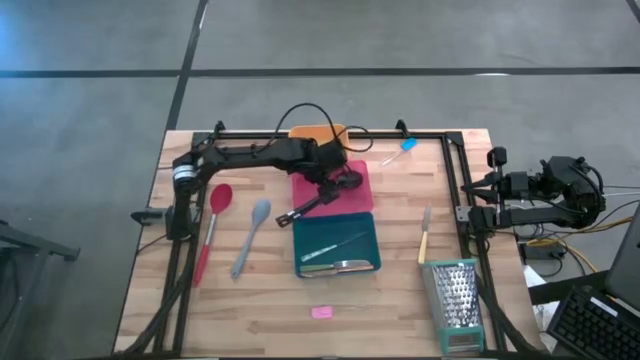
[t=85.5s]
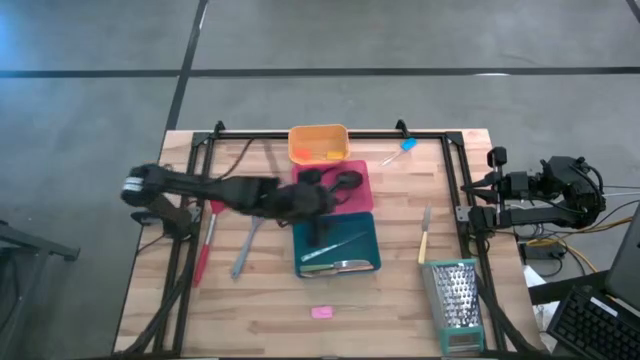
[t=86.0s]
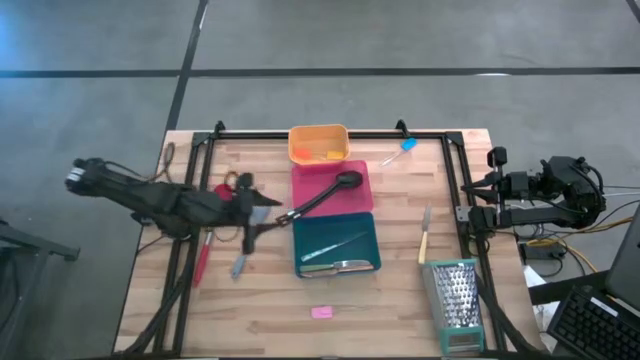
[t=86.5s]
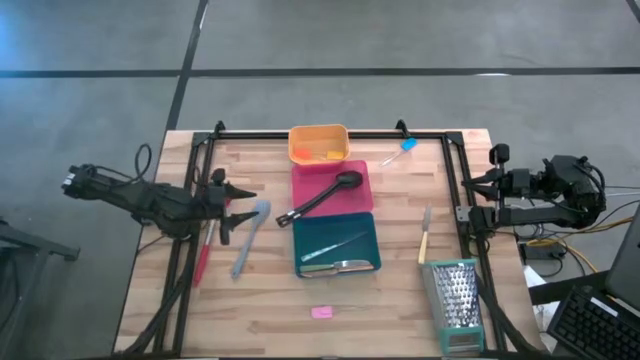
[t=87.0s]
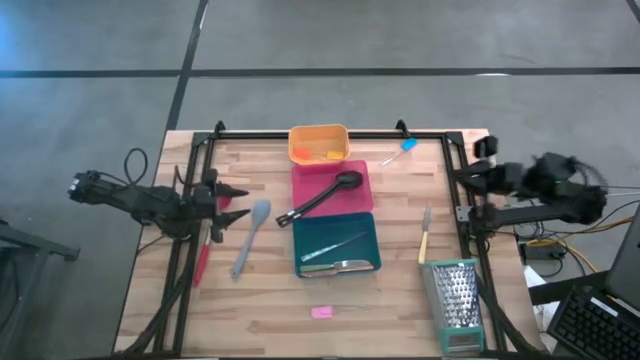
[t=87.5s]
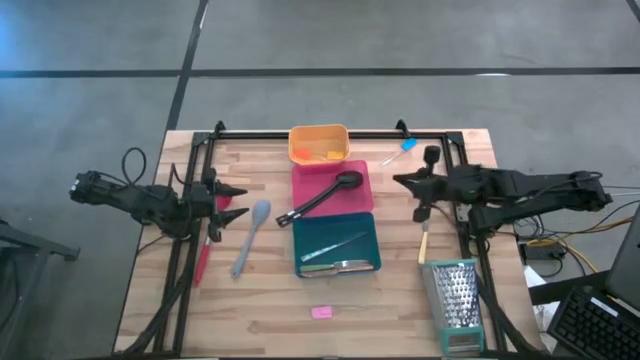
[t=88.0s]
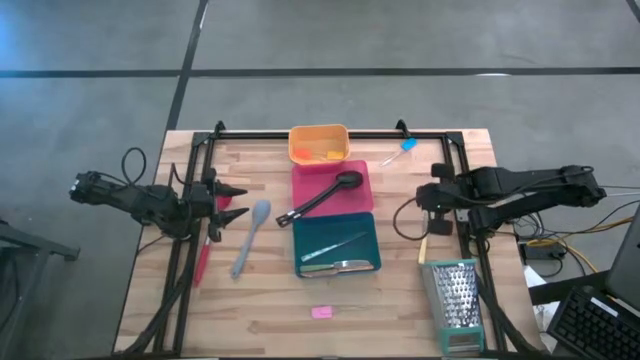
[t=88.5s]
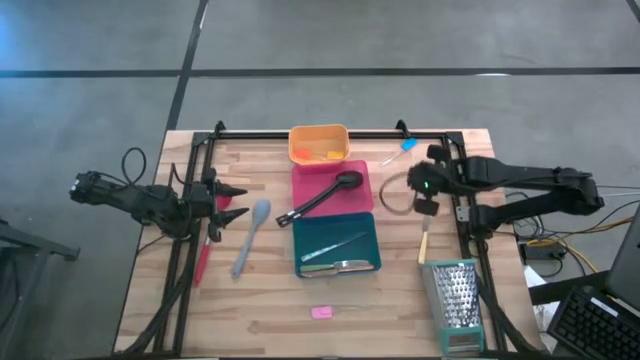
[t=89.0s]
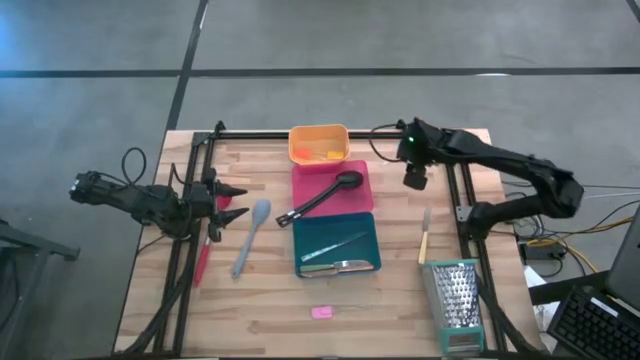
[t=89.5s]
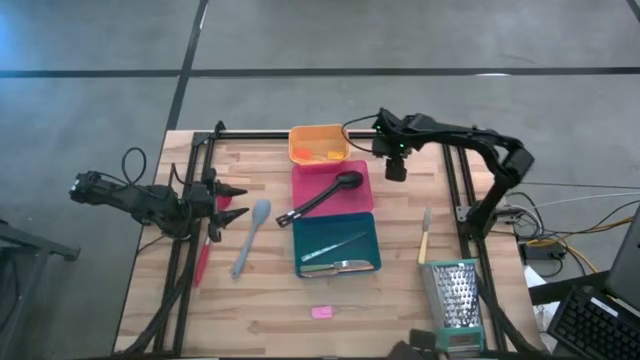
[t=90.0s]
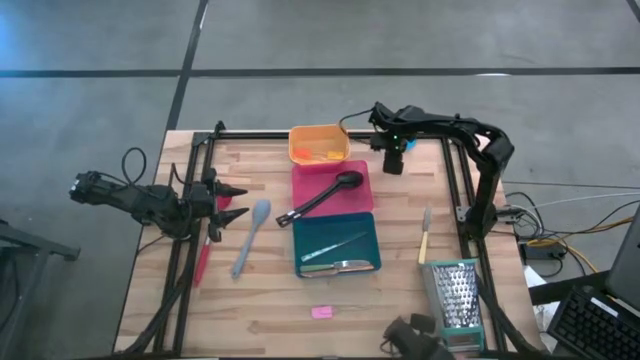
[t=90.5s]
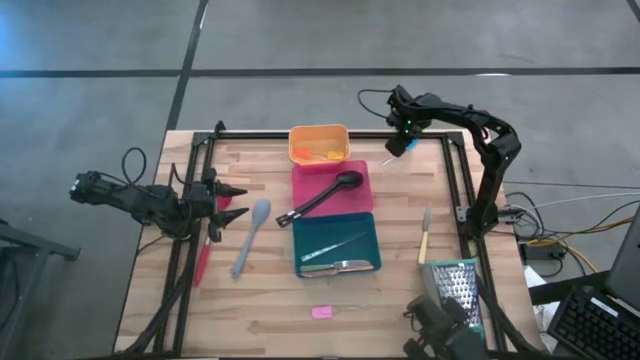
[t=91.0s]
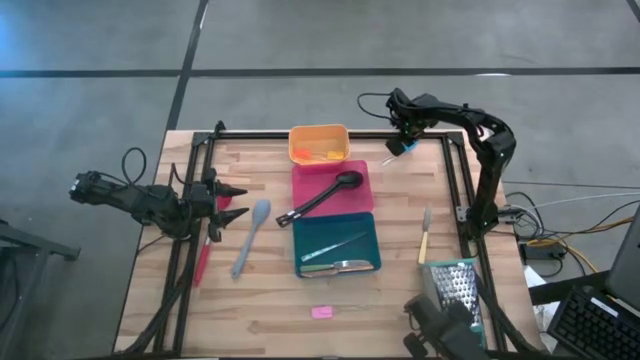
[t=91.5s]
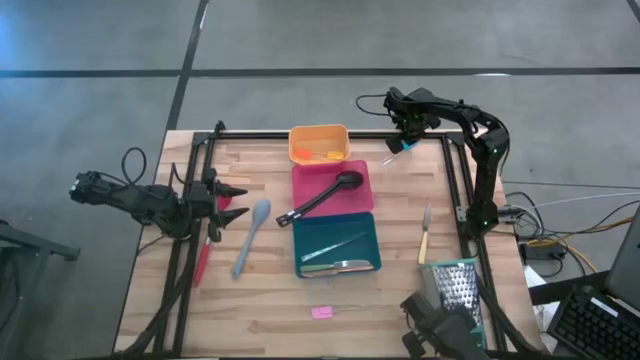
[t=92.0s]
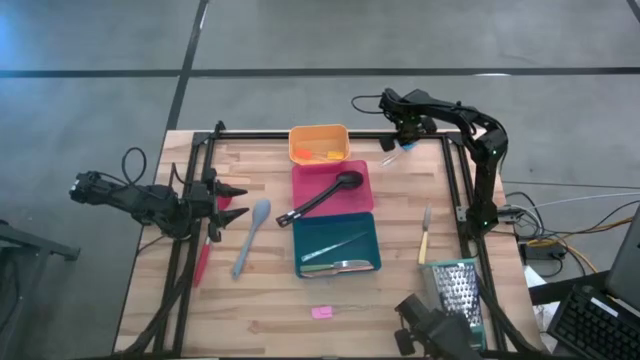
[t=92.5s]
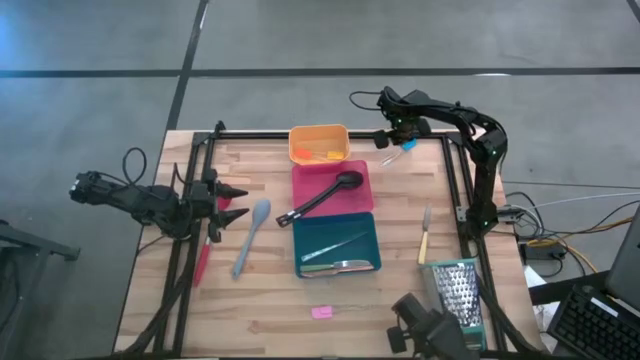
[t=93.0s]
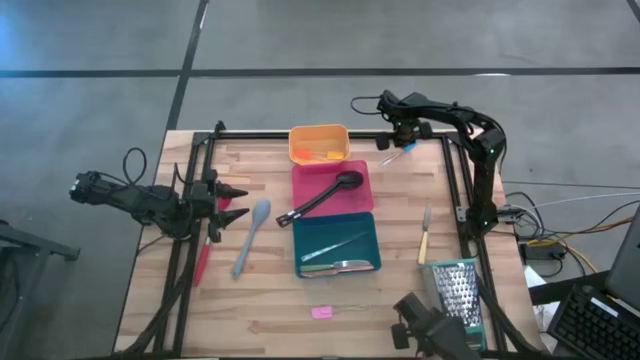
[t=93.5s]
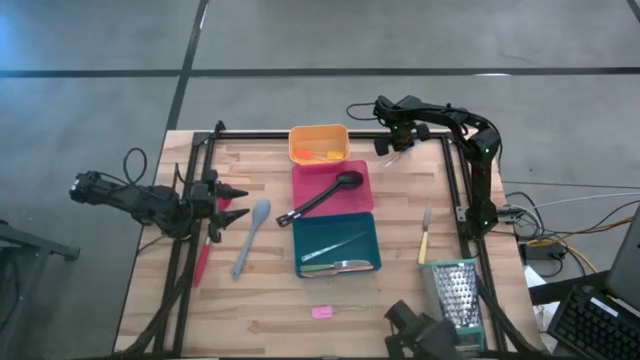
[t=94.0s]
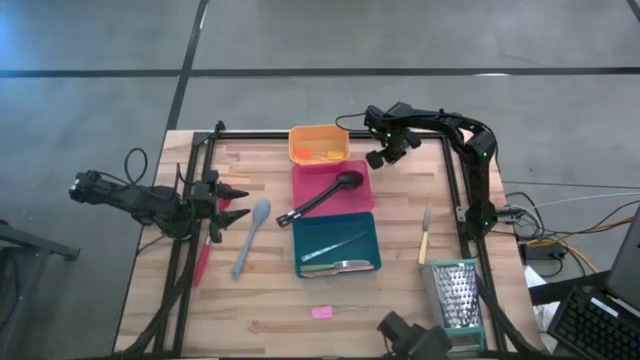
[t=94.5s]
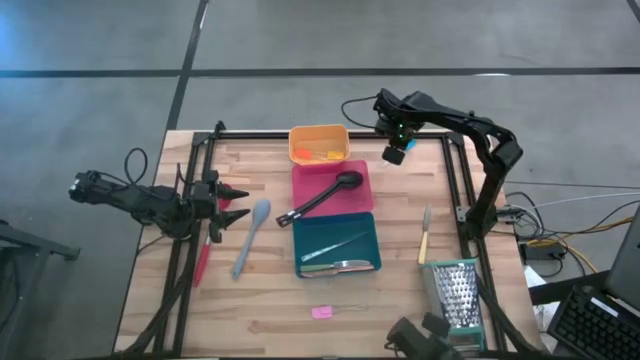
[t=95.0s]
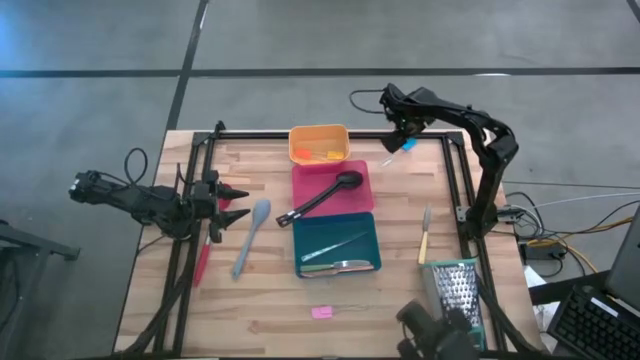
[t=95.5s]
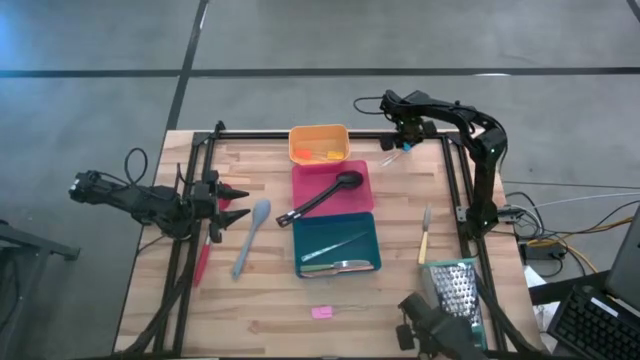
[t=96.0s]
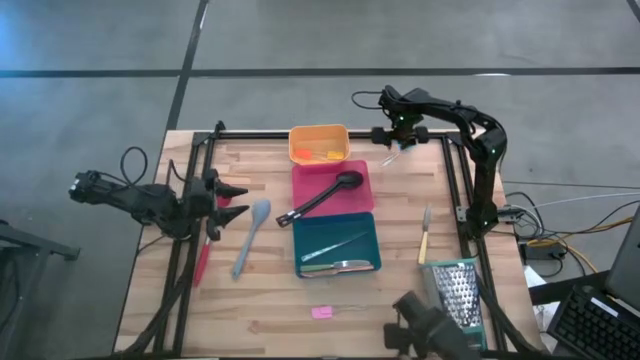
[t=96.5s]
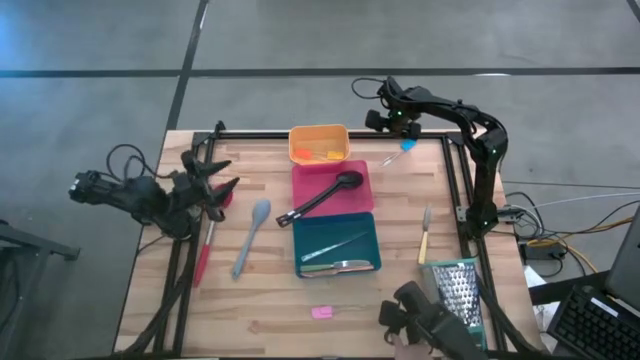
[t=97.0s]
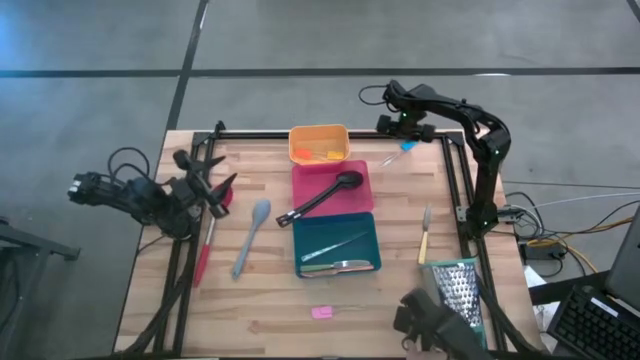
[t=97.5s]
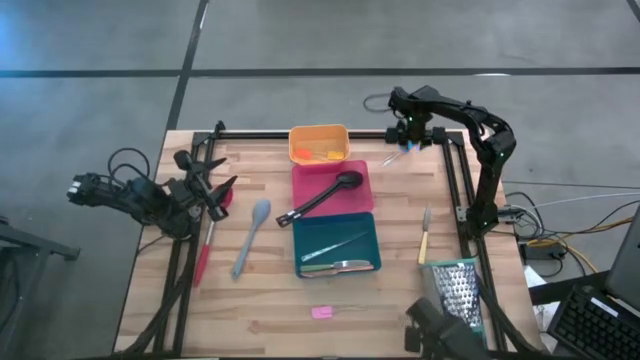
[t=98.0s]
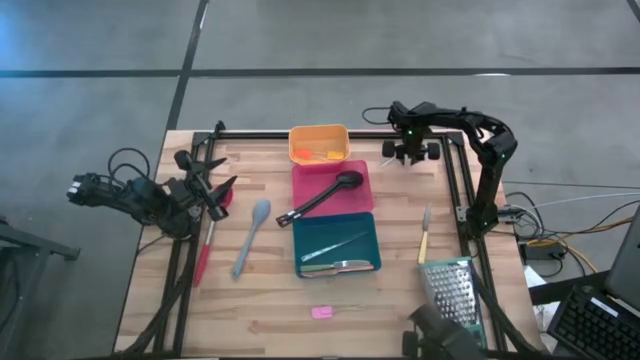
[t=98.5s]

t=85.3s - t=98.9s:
Task: Pick & Place Kitchen Items
Put the blue spatula into the yellow bin

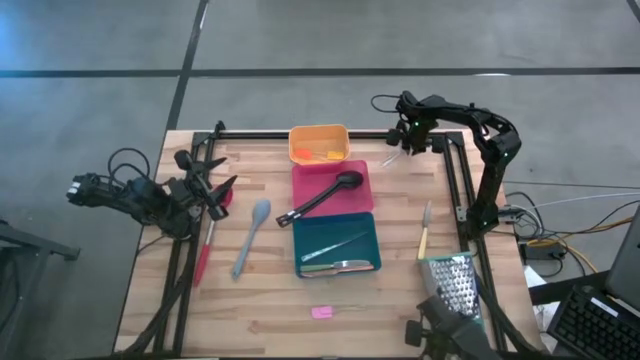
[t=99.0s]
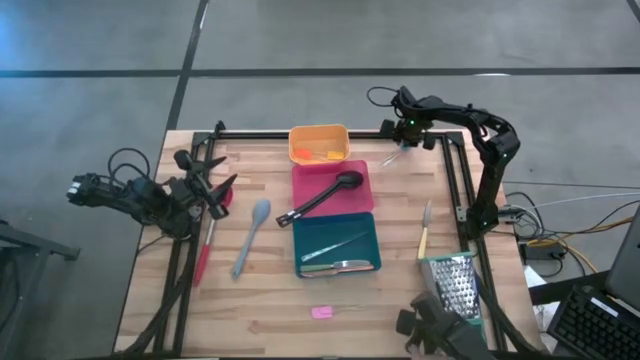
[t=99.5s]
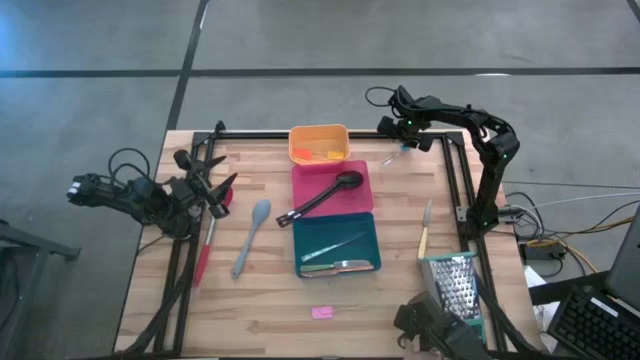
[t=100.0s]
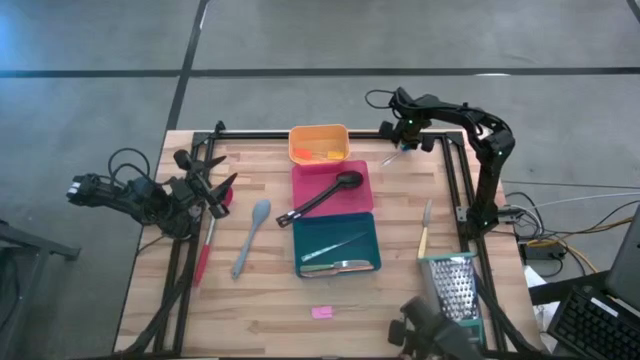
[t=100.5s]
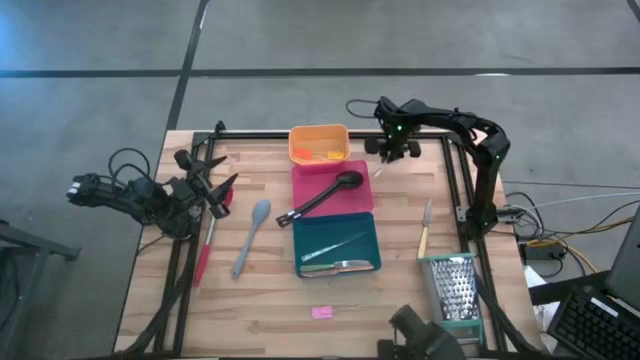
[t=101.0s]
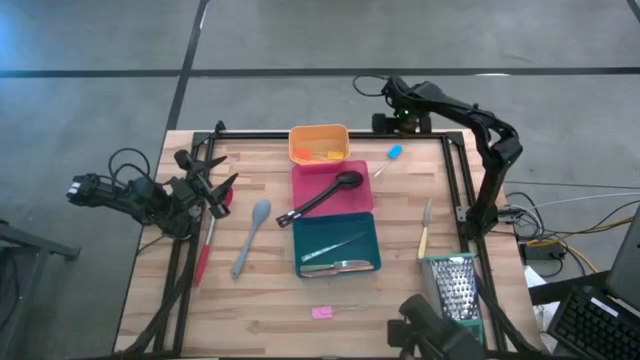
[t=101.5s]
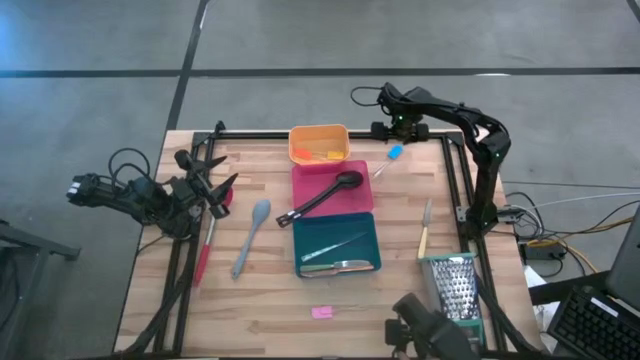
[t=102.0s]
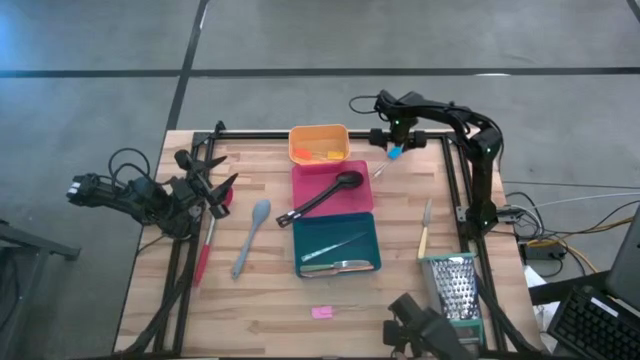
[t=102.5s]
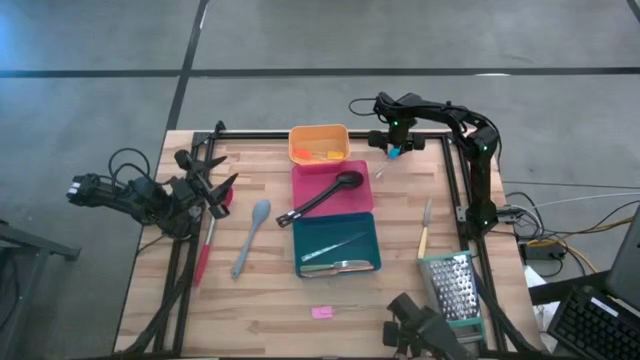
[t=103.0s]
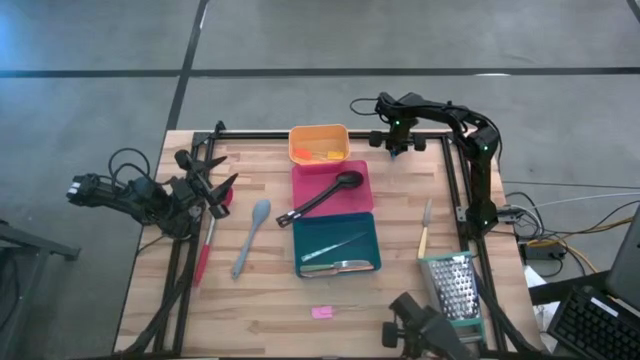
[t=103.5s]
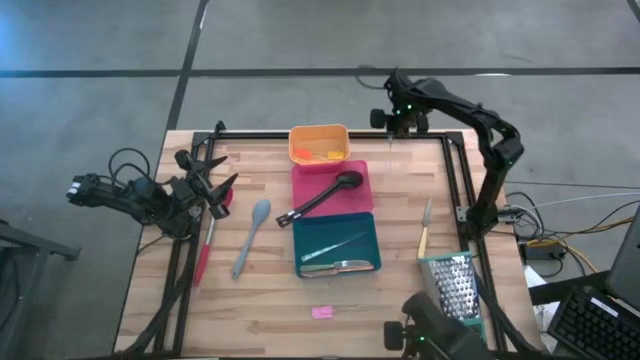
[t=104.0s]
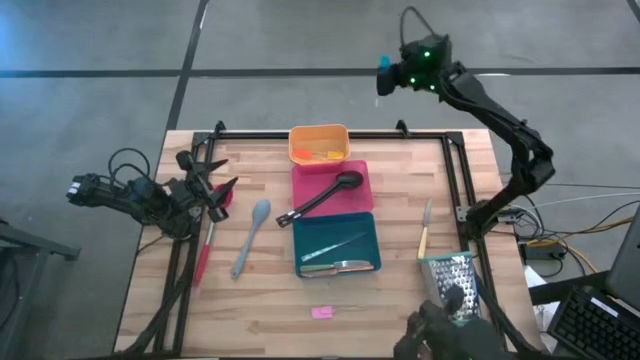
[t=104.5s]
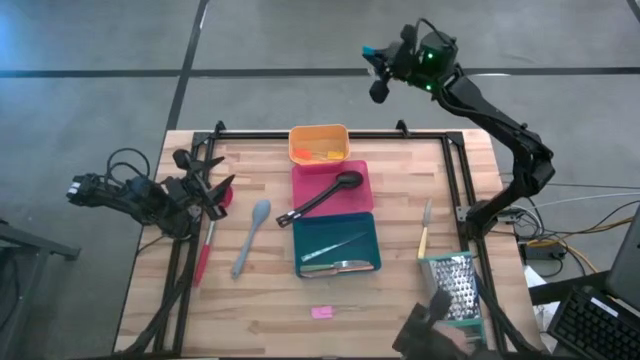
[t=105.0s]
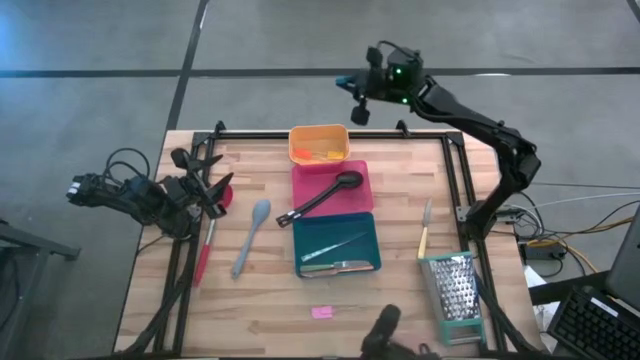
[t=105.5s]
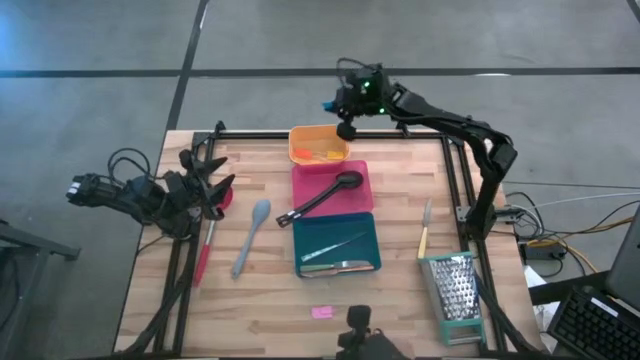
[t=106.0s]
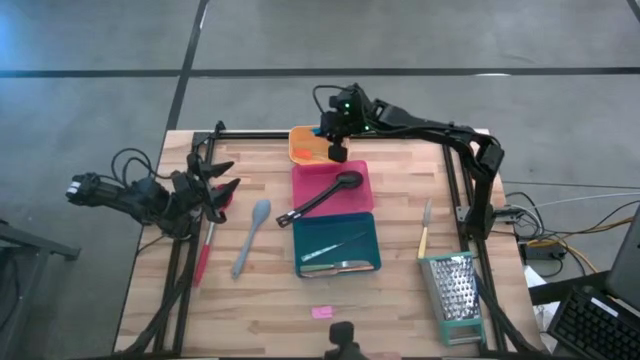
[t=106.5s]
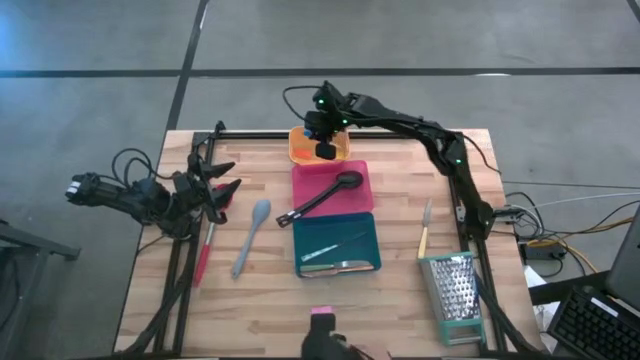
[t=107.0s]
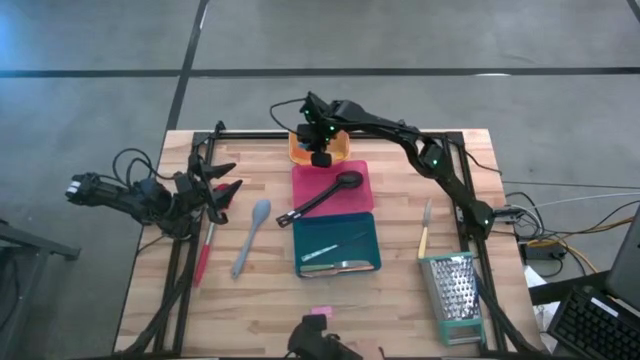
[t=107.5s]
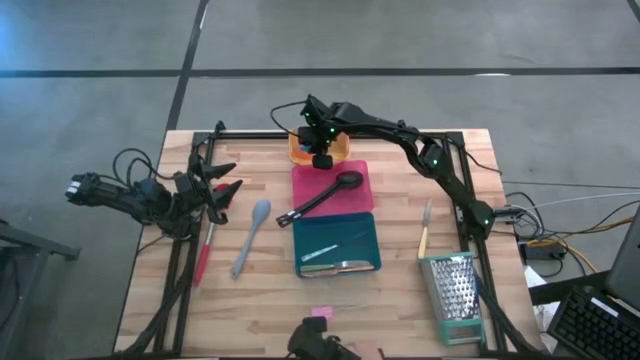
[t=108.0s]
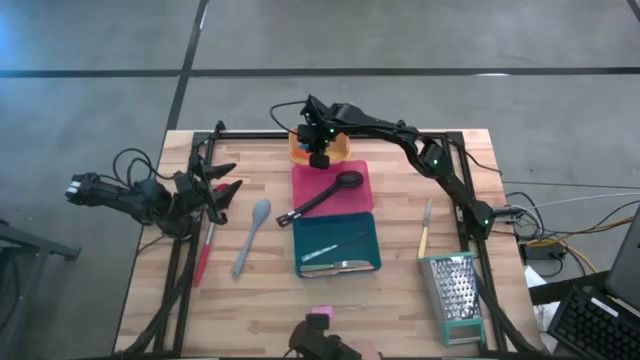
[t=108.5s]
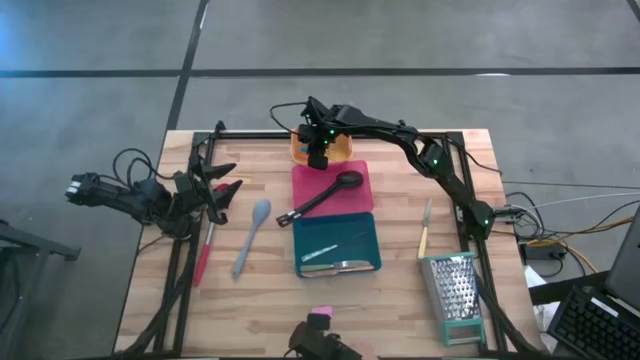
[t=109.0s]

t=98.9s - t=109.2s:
Put the blue spatula into the yellow bin
